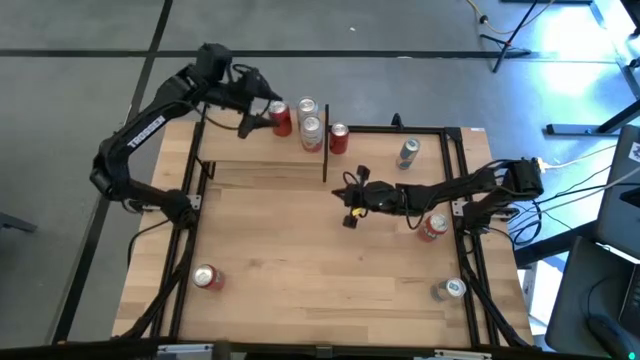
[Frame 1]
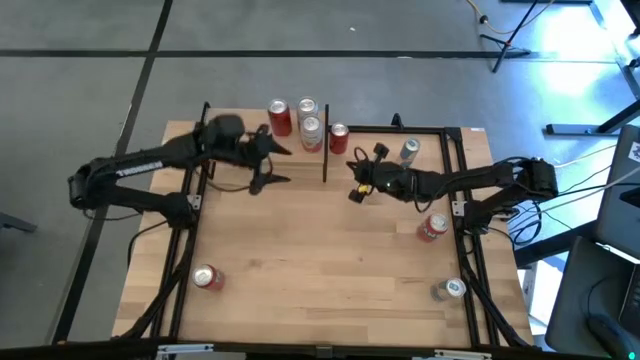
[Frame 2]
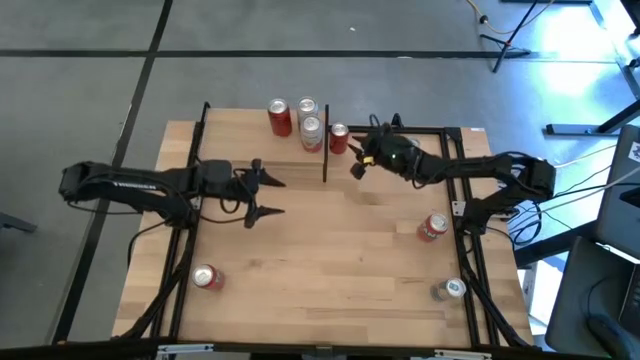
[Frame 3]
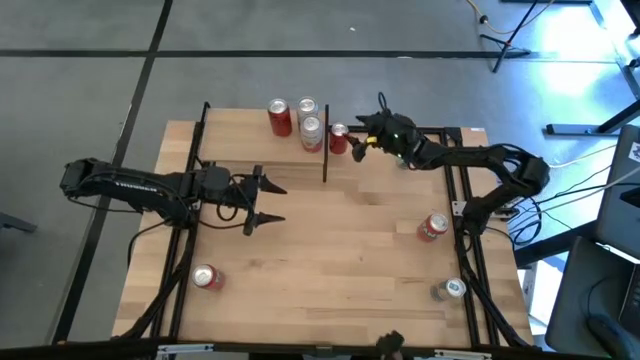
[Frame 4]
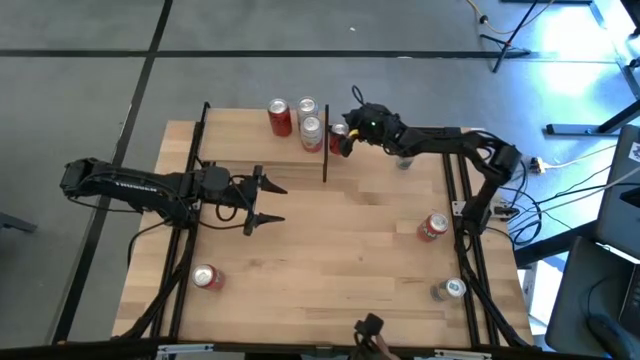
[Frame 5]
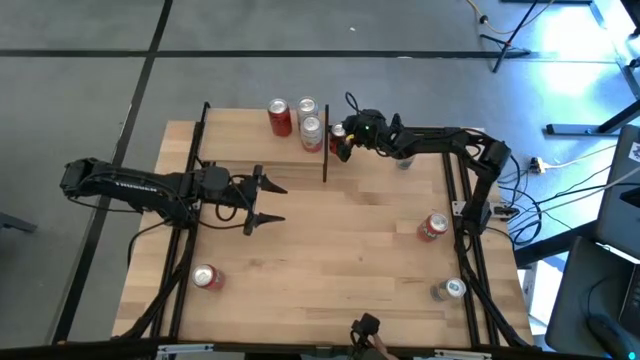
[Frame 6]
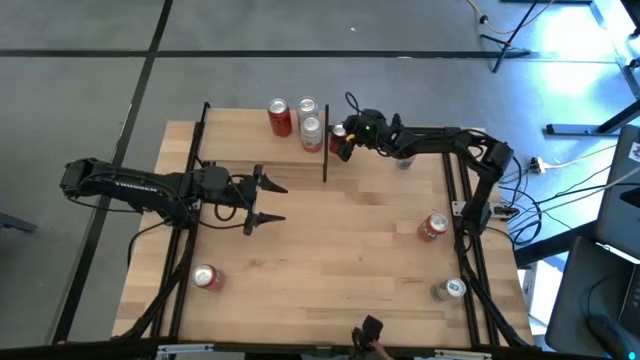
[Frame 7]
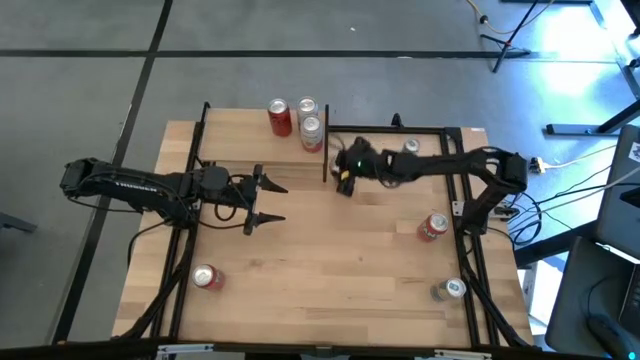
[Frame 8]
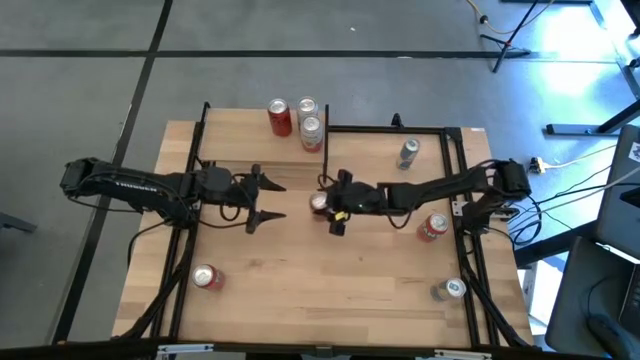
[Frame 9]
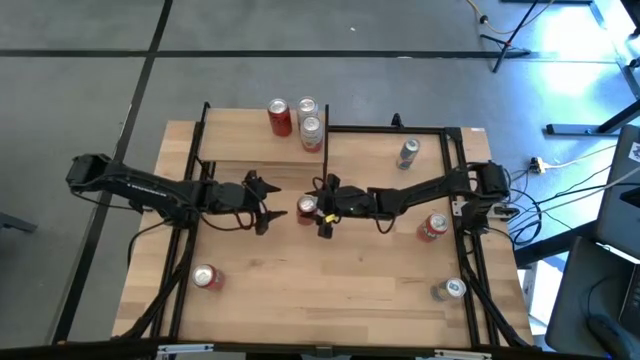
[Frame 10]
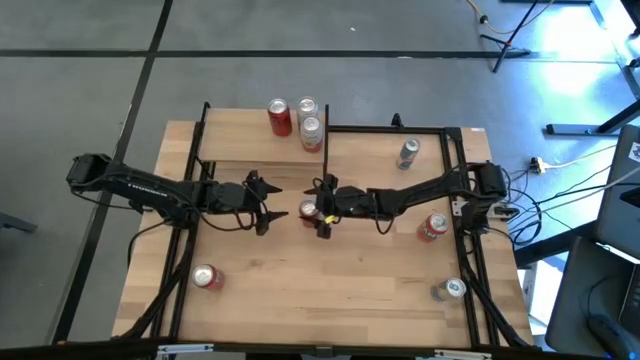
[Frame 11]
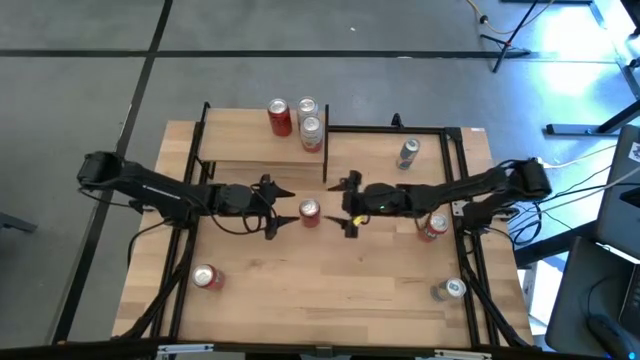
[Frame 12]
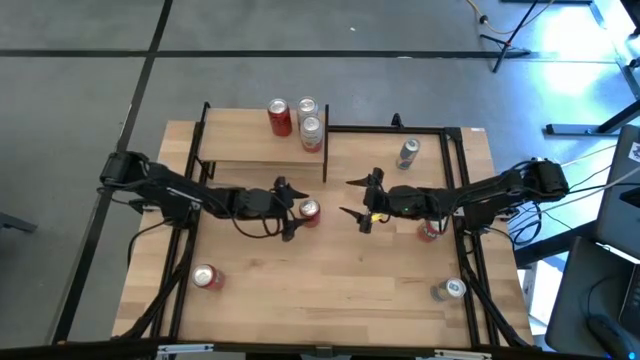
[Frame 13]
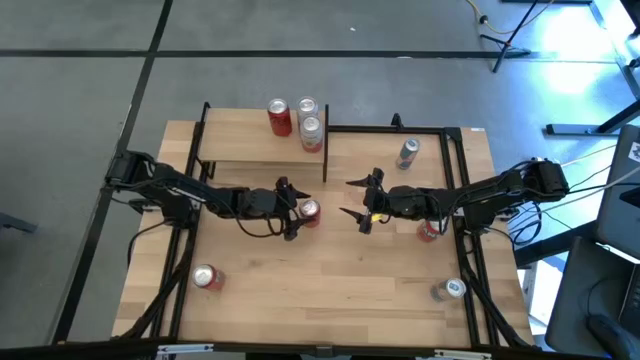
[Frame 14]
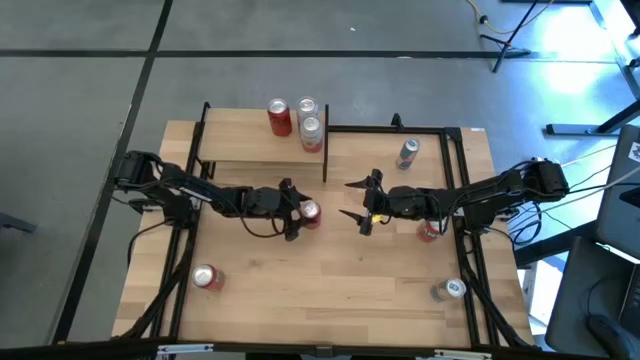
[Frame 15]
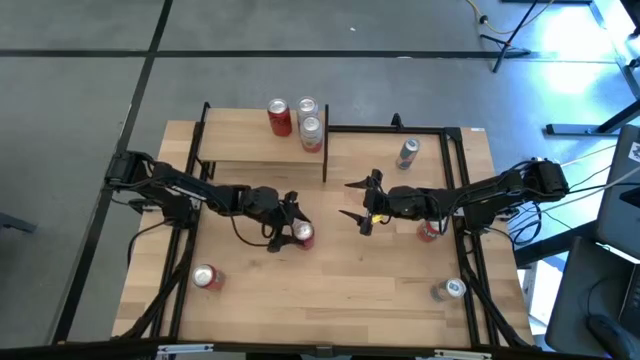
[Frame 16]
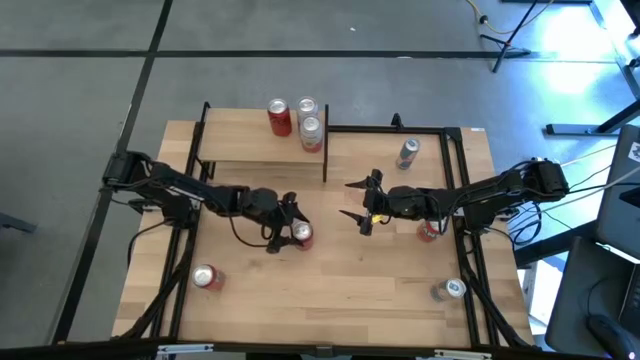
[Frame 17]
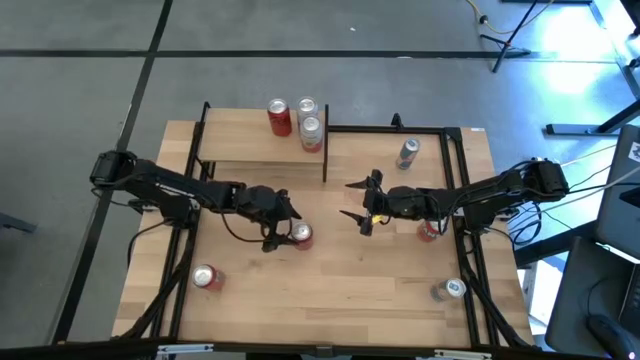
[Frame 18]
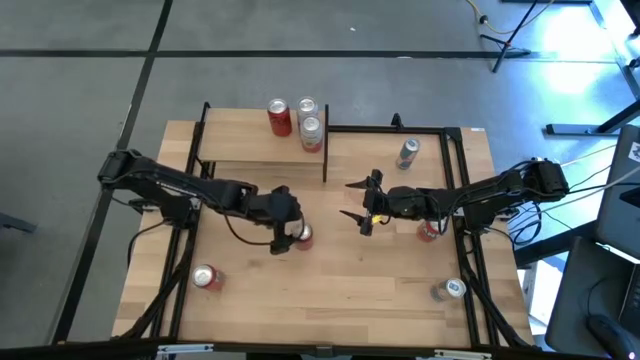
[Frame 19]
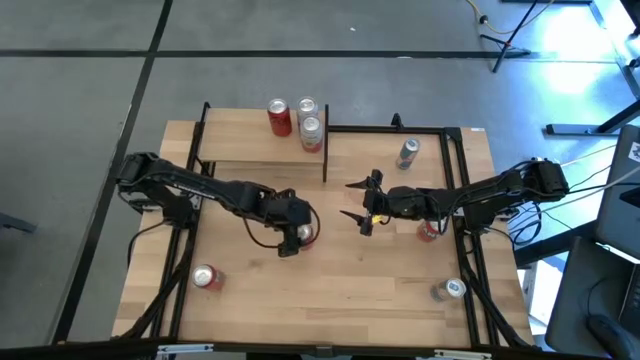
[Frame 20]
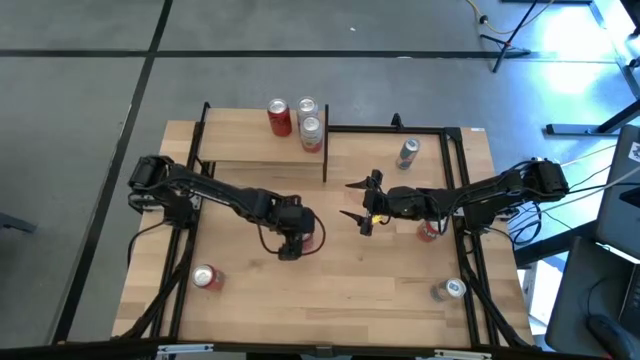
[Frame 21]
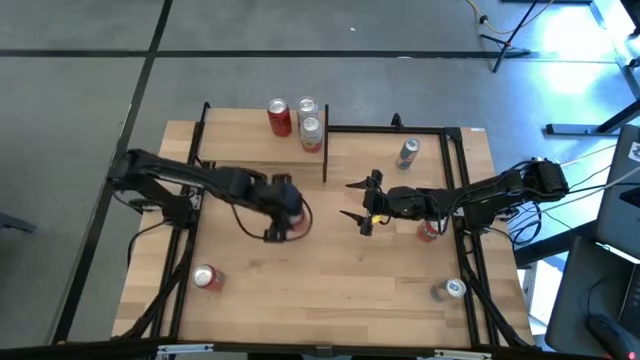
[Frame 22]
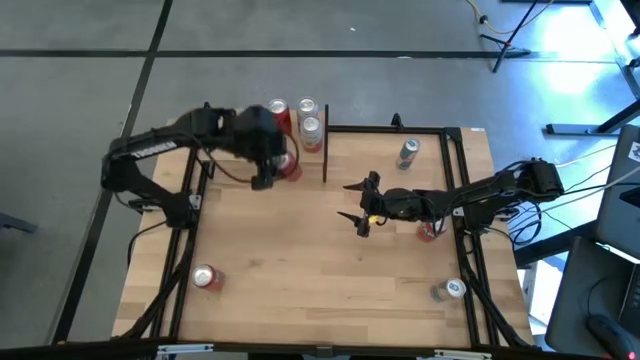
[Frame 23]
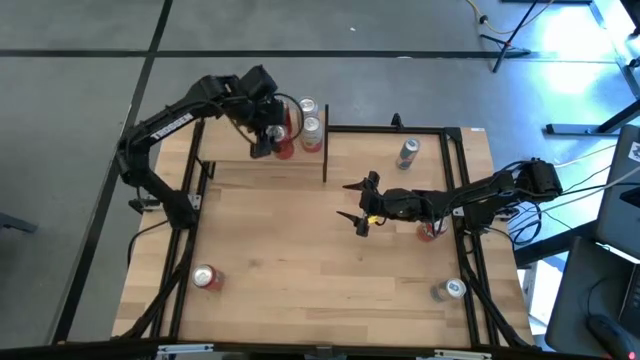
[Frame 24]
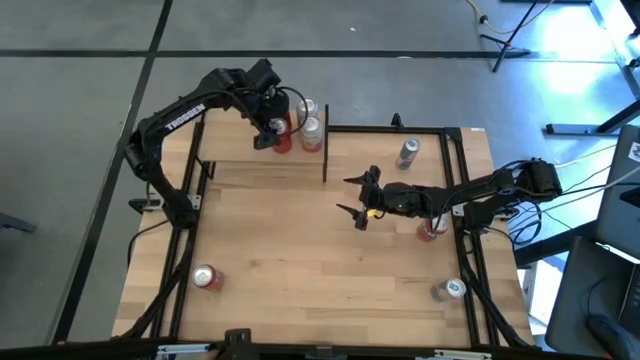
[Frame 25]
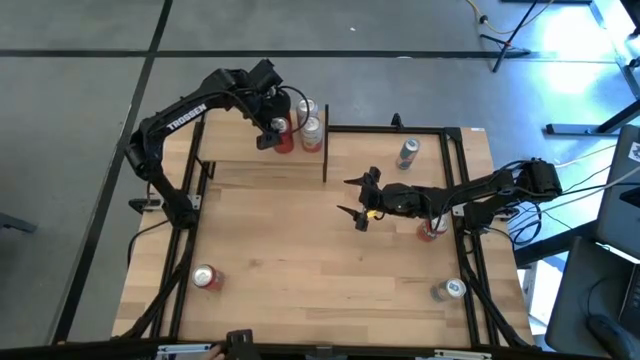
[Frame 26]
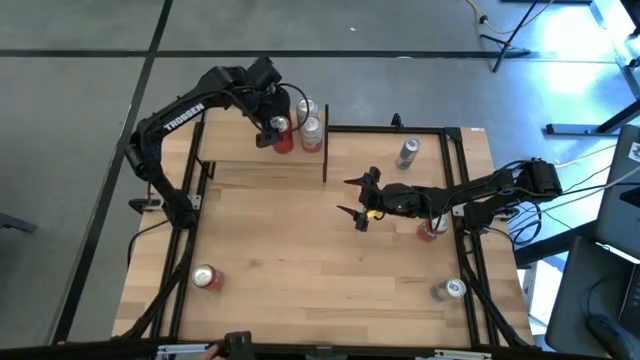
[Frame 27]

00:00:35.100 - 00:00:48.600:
Task: Place canned beverage on shelf
Put the red black soda can aligned with the other red black soda can on the shelf

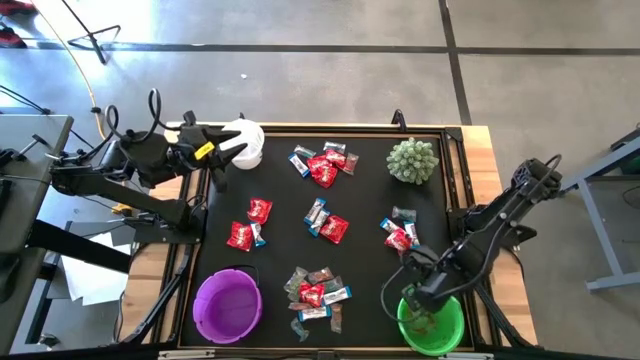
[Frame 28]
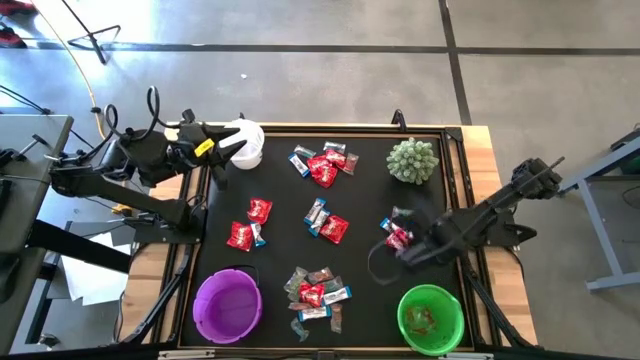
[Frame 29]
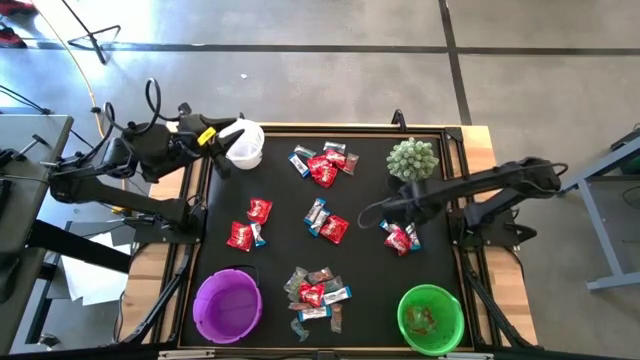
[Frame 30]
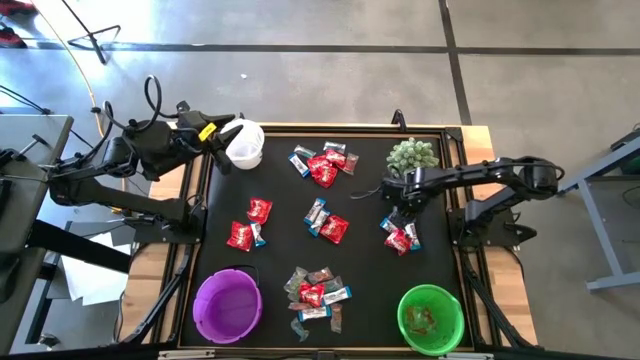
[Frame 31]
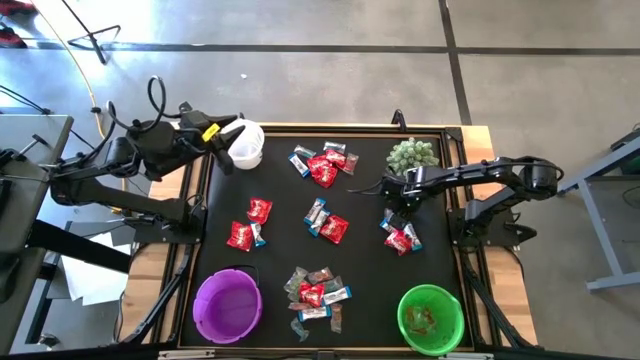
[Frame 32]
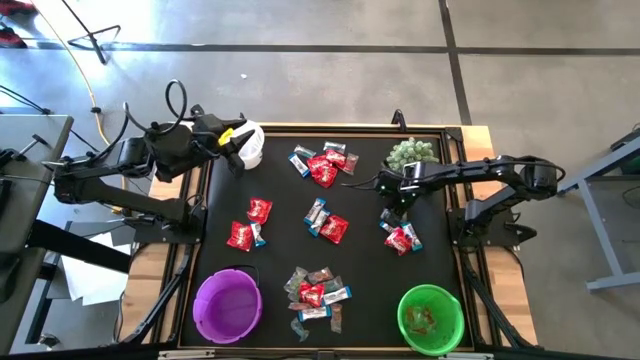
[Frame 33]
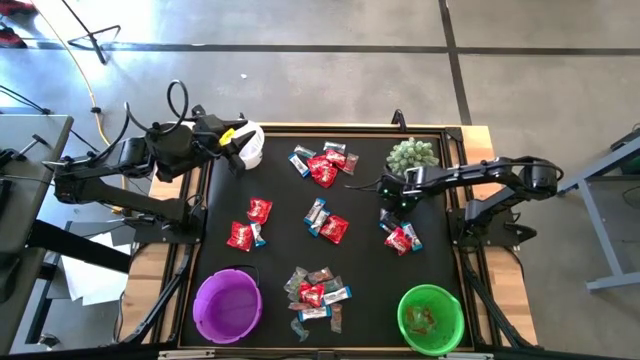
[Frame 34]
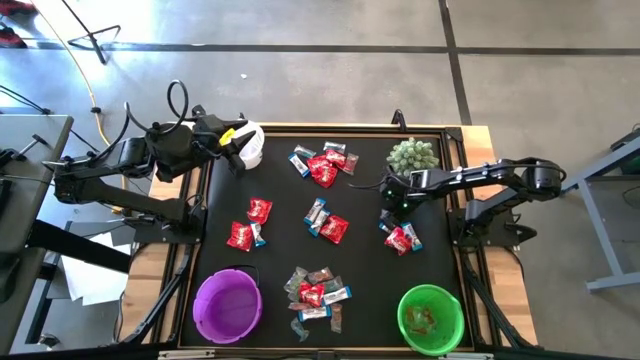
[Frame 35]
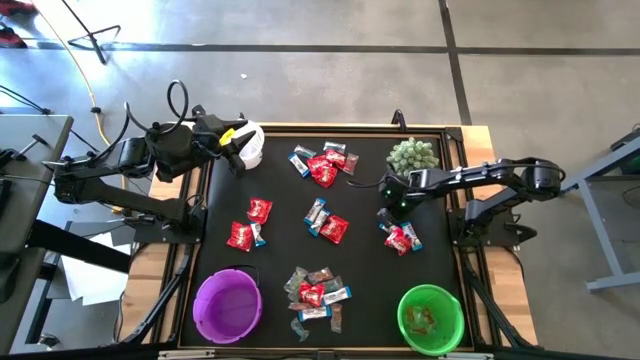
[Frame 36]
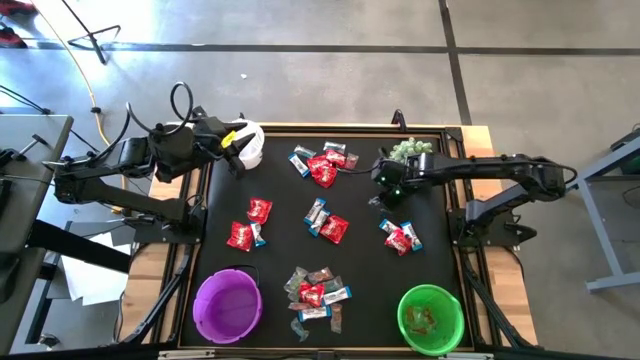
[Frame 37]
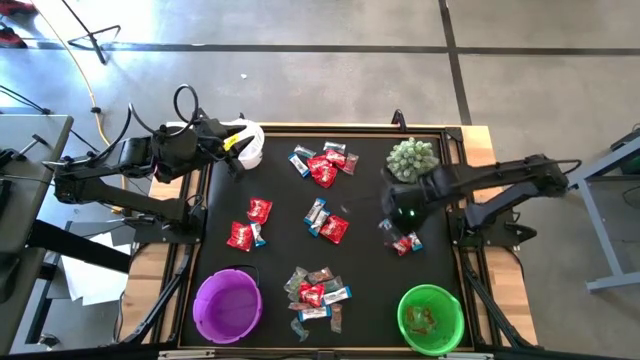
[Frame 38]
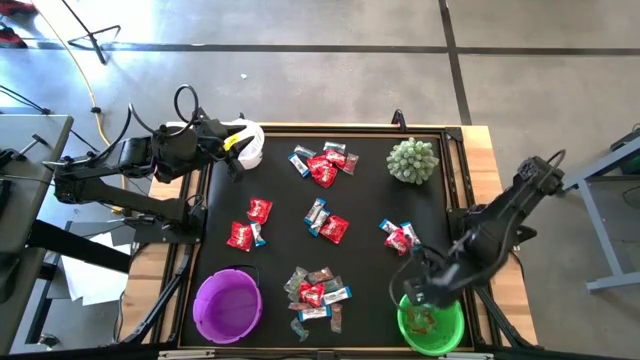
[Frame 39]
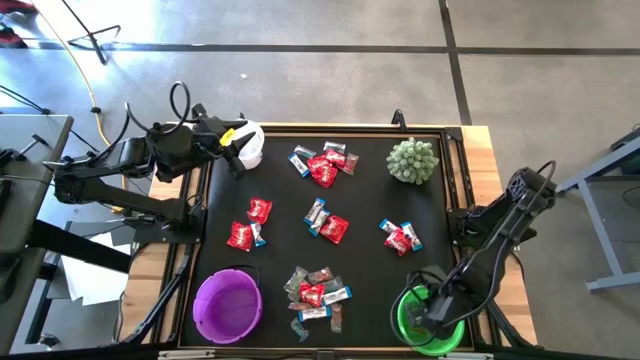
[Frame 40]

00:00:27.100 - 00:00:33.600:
Task: Sort candy
Put the blue gummy into the green bucket
